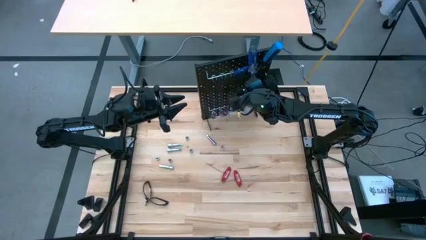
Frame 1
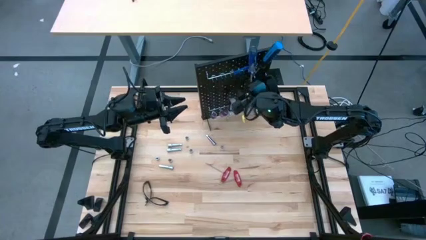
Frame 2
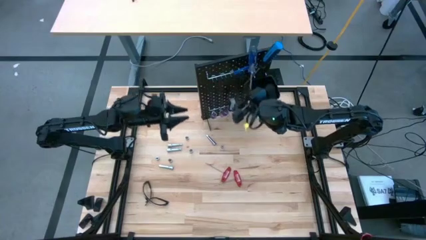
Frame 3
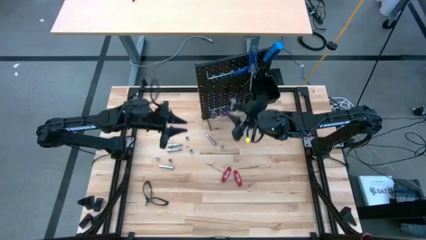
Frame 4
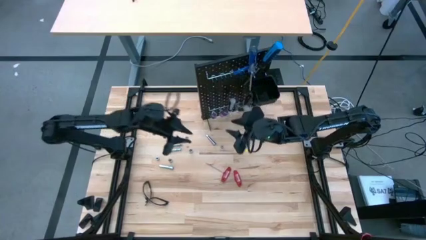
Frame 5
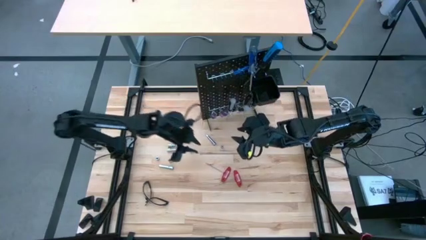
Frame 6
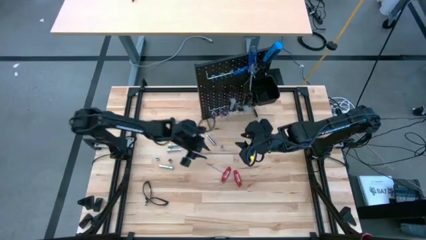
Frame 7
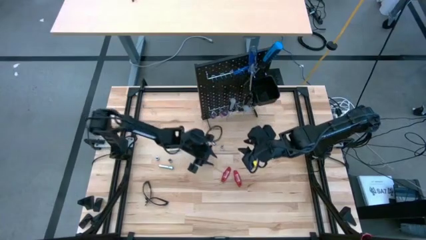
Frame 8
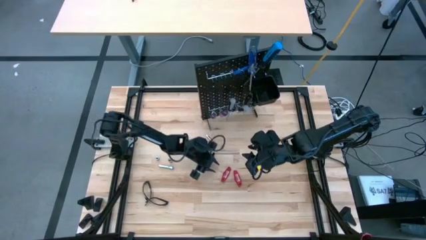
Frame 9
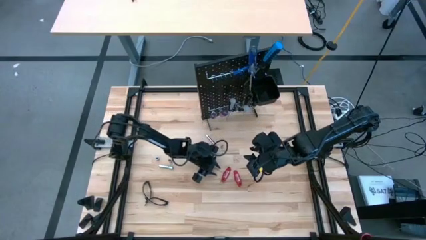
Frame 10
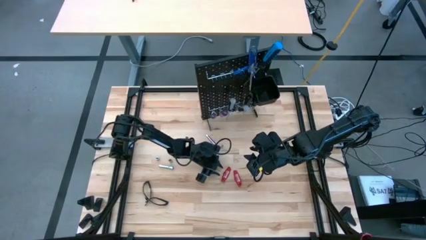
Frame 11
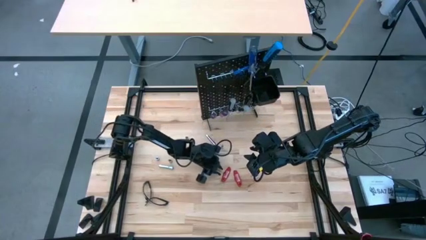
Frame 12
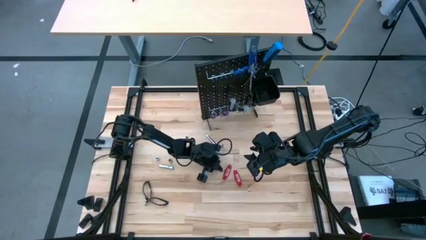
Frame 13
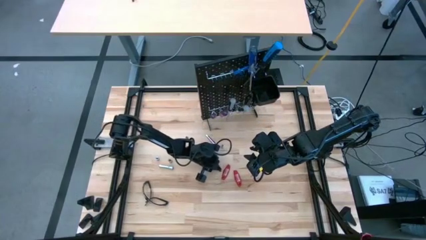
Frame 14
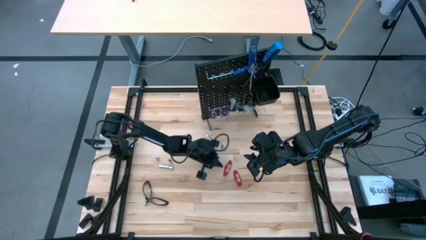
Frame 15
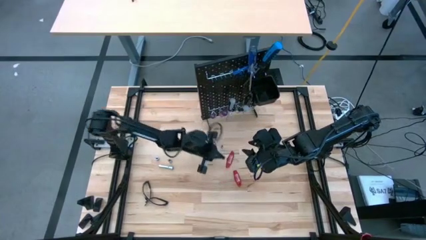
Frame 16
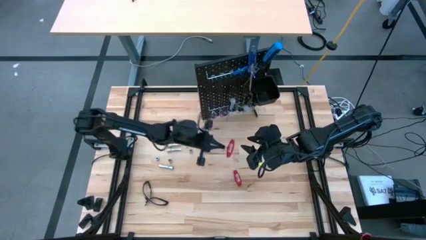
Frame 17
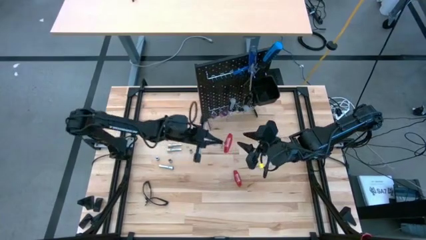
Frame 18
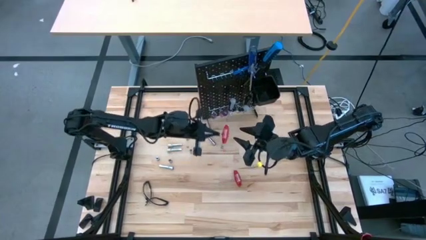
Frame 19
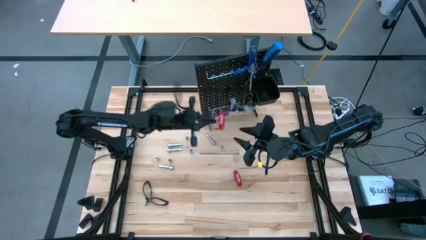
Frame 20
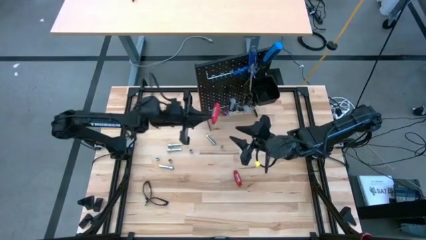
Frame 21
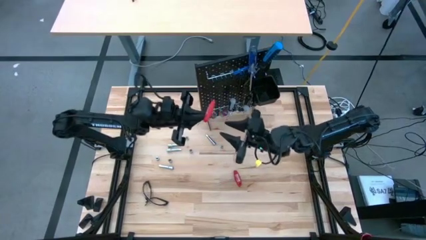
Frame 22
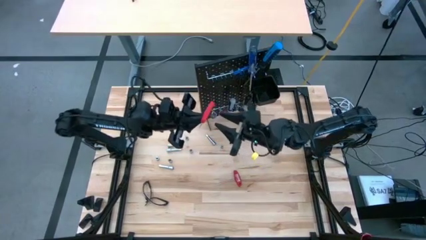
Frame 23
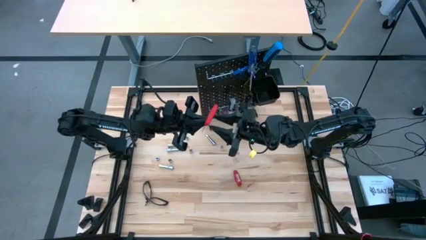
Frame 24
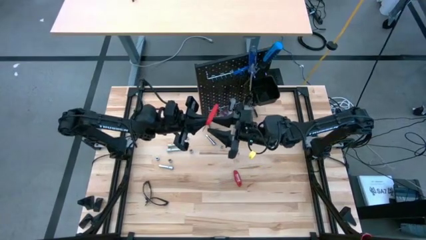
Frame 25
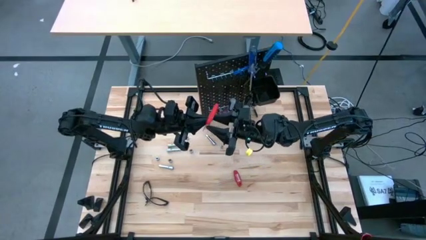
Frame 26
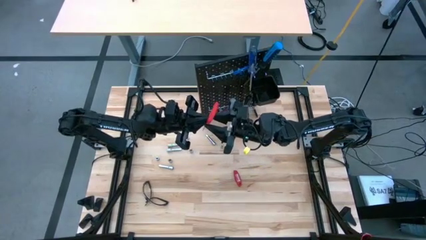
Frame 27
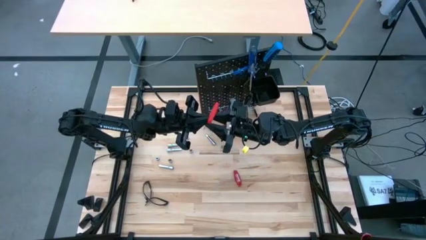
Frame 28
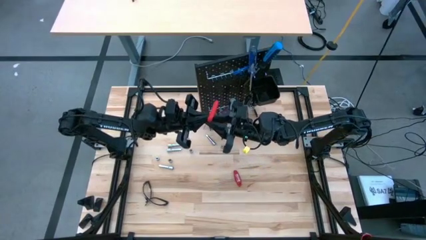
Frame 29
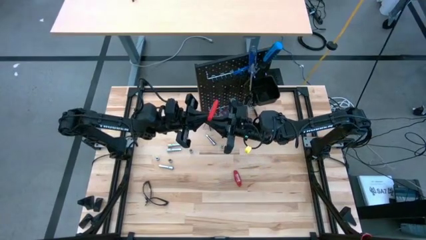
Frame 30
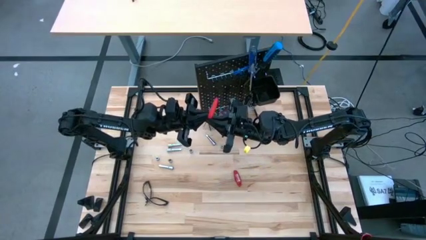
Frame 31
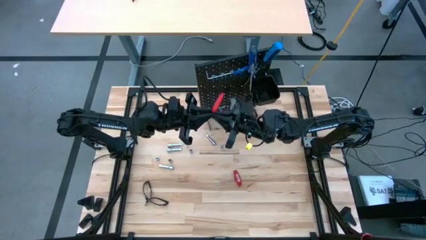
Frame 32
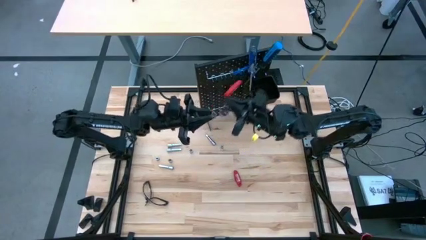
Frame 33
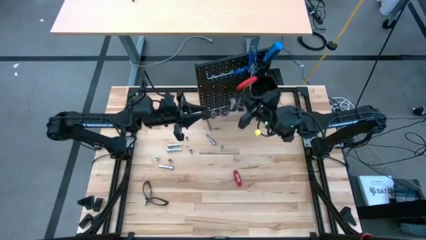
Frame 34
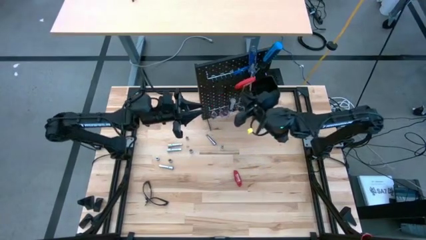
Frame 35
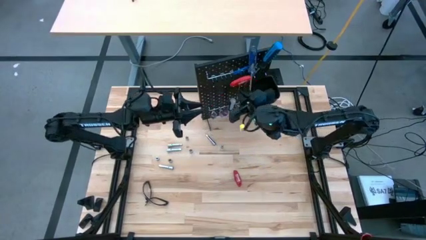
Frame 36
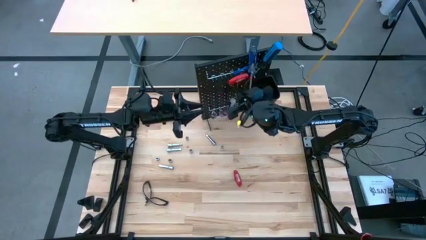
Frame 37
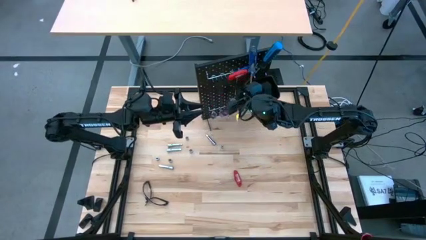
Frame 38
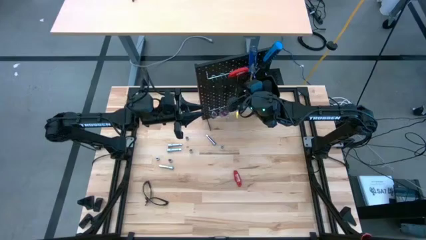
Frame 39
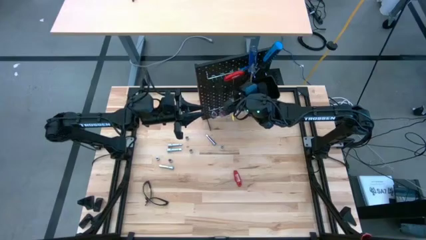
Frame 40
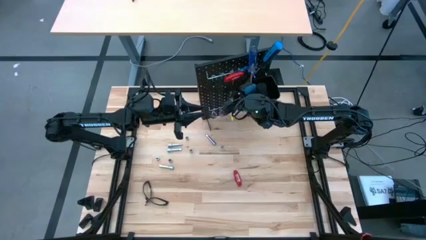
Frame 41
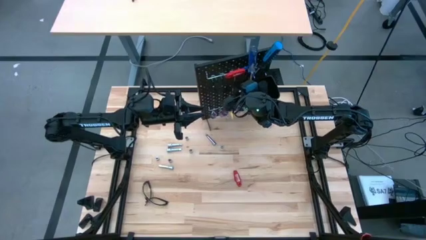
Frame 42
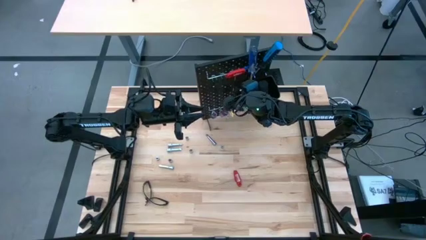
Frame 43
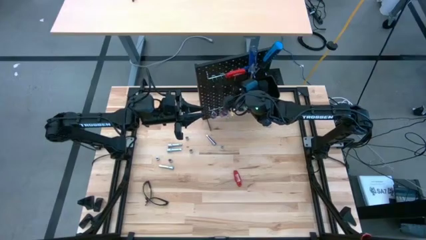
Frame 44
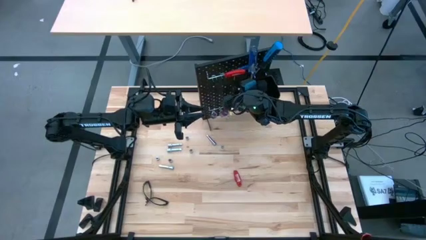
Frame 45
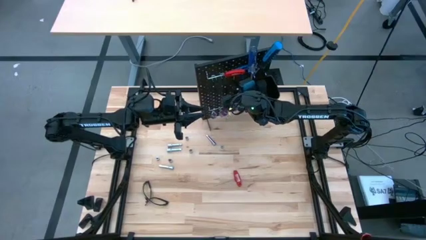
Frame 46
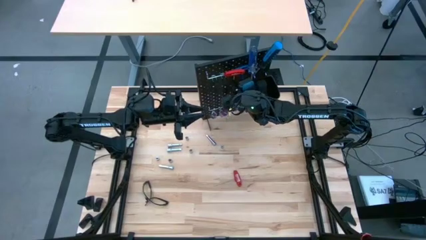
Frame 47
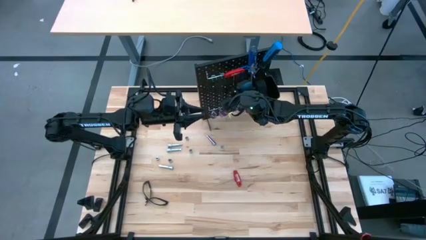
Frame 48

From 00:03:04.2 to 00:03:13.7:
Task: Hang tools onto peg board
Hang the red allen wrench on the pegboard

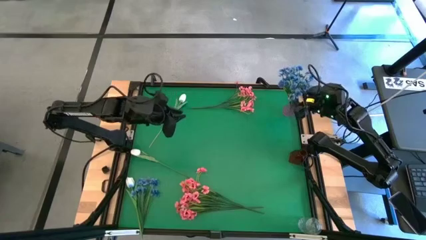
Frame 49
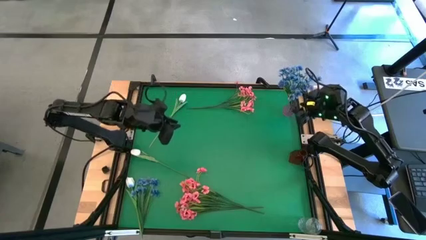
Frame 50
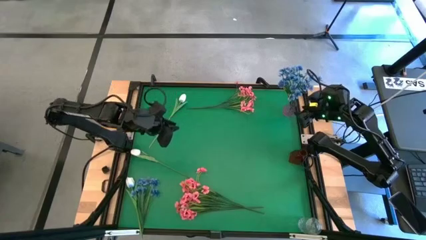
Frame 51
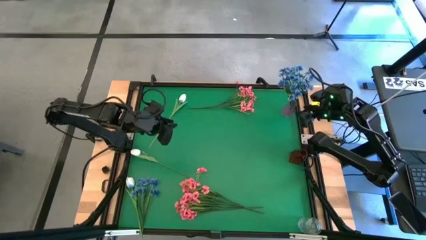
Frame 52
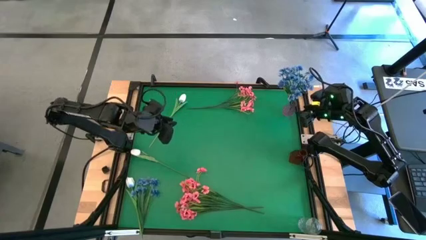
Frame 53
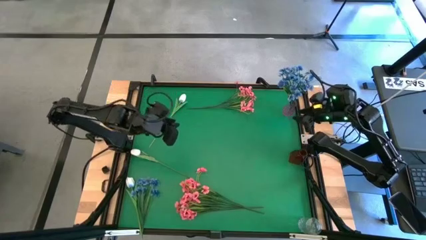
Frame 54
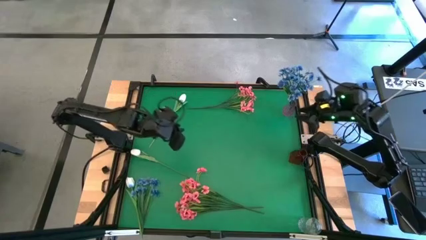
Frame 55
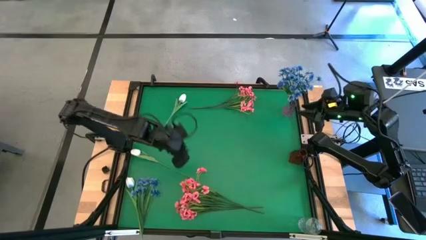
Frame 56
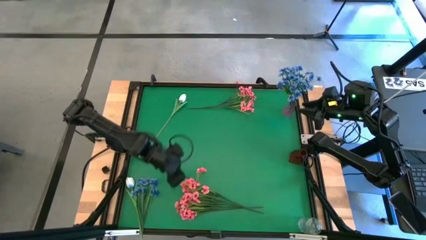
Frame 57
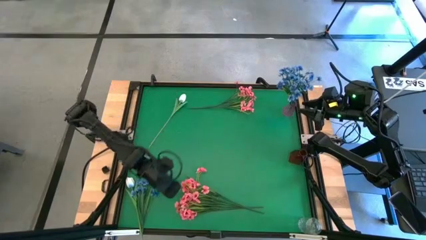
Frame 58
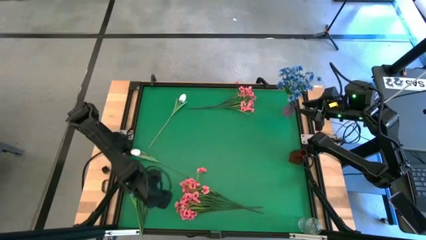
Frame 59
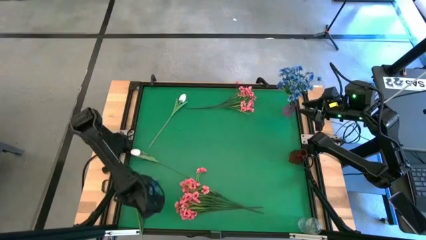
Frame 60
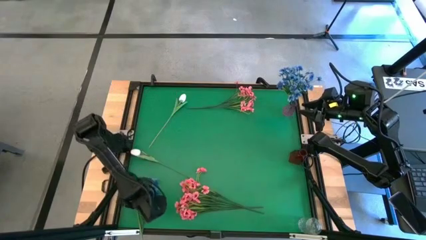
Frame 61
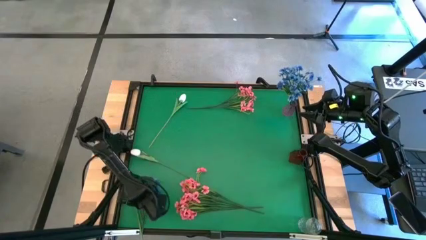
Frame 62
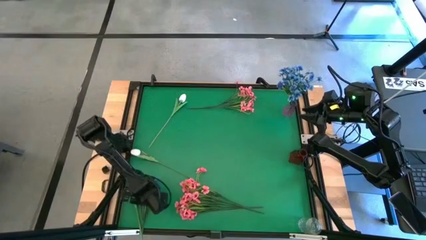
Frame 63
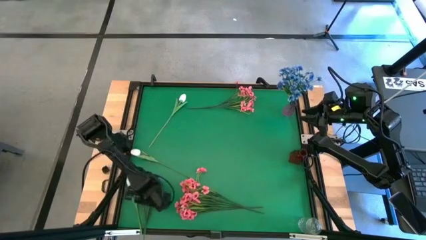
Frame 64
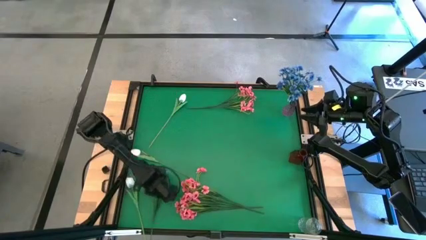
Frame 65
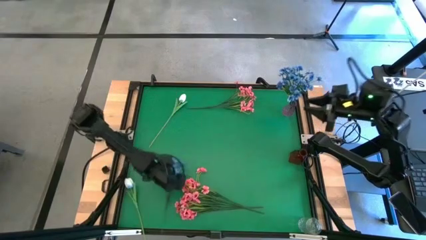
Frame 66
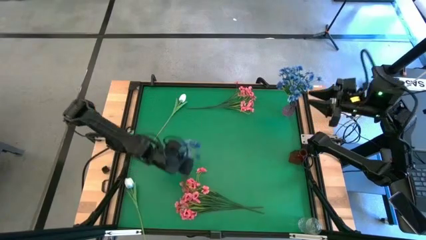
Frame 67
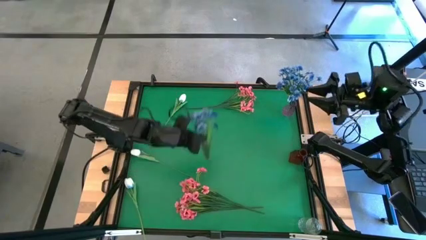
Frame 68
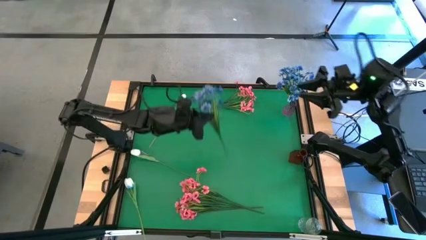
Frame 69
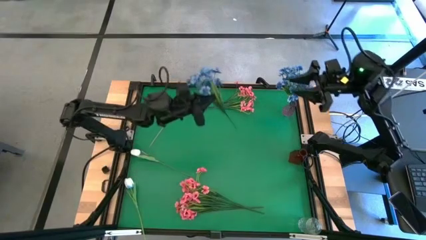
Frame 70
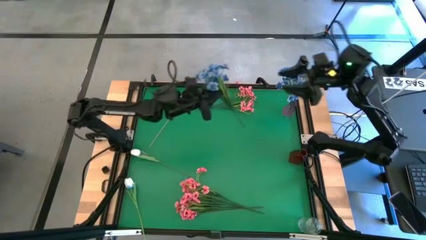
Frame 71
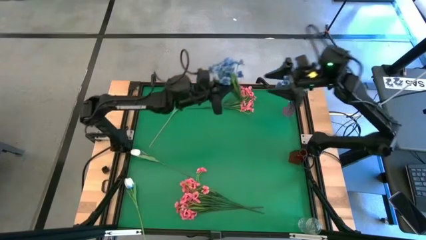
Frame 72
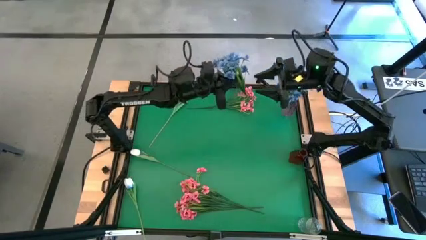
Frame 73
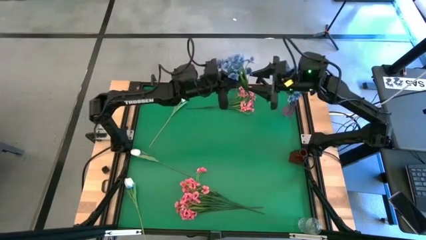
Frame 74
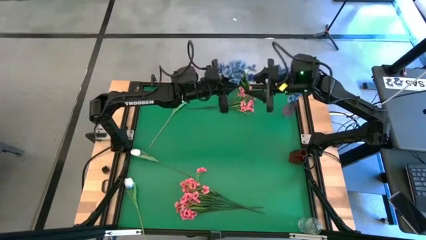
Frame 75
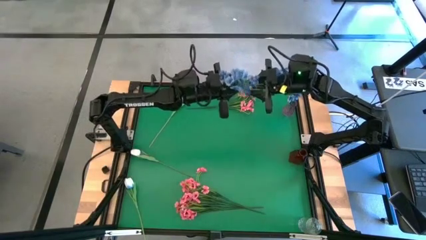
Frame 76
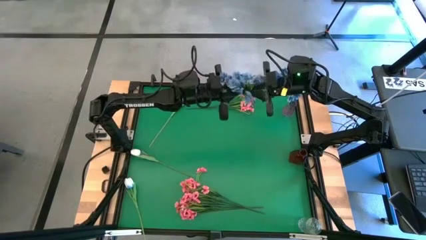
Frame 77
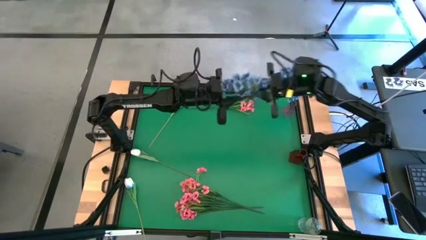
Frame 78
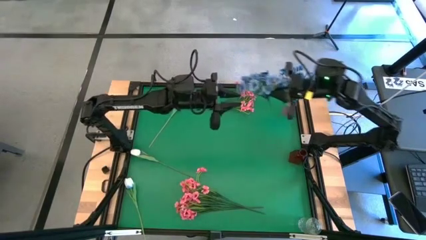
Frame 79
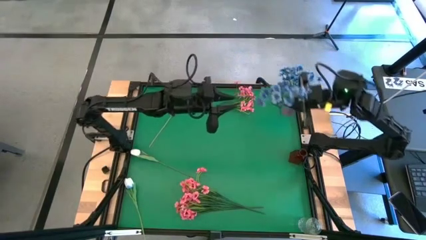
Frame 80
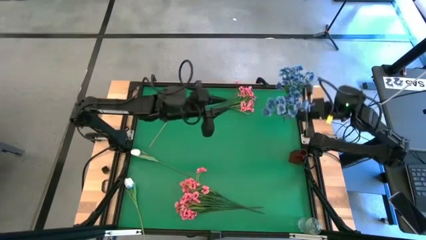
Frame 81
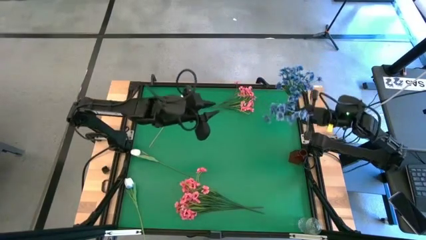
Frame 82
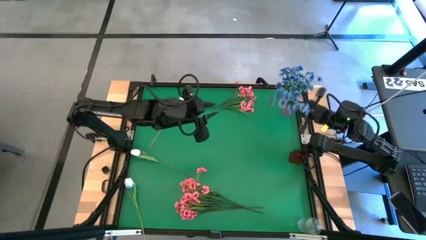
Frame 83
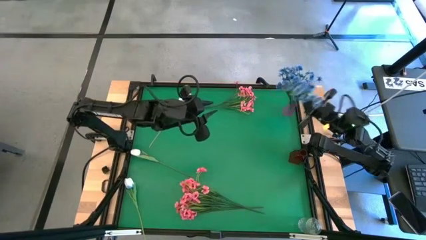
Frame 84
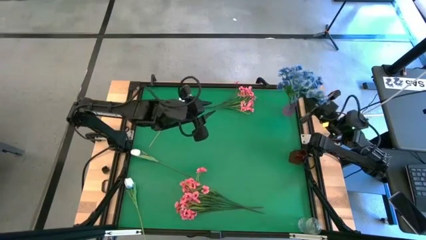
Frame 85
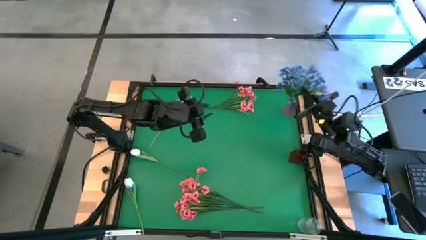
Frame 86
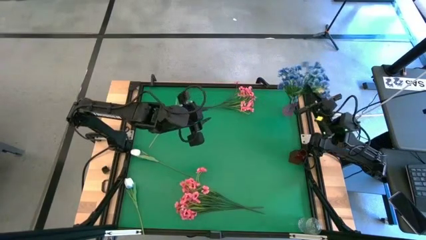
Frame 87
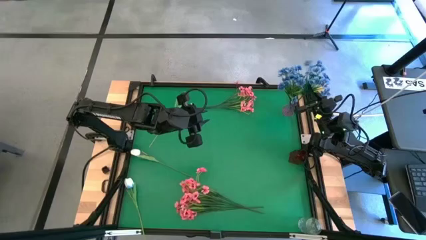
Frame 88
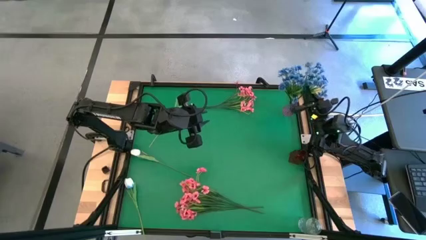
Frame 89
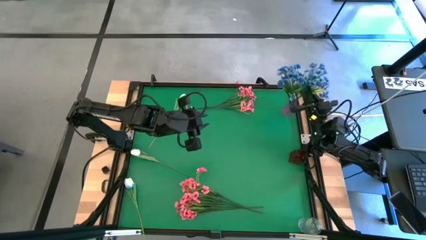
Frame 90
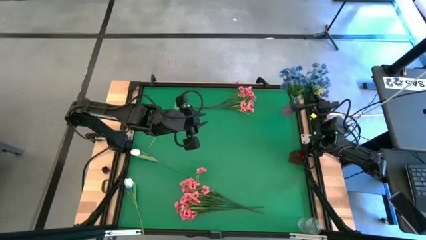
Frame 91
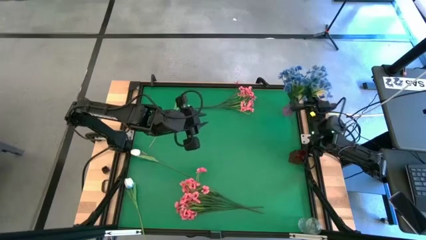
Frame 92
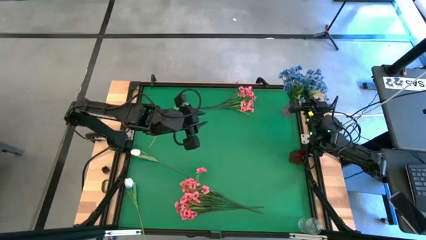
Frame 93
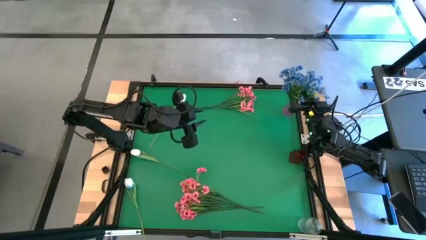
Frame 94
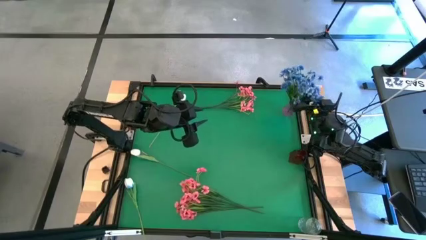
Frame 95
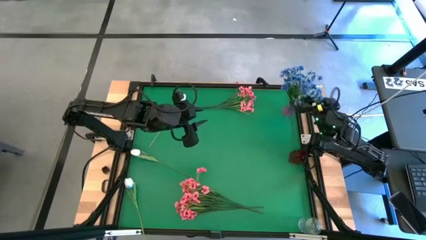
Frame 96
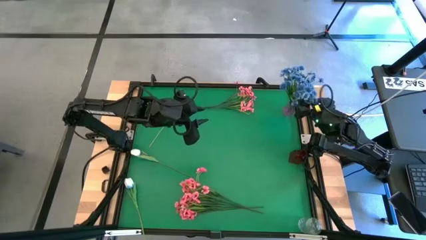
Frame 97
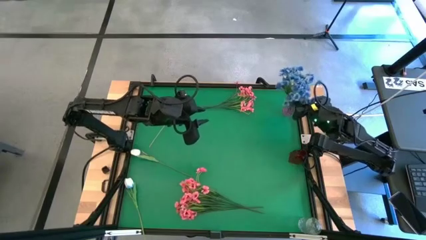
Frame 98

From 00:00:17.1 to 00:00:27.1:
Task: Sort flowers into vase by color
Put the blue flowers into the purple vase
